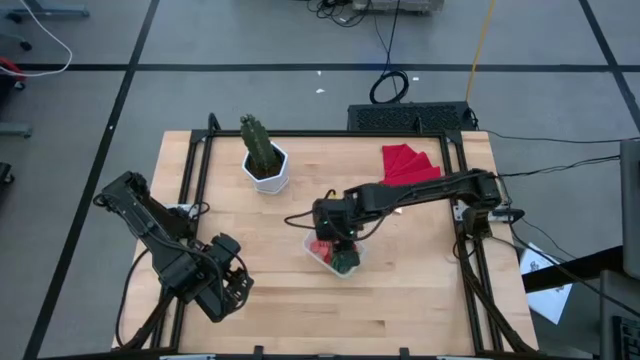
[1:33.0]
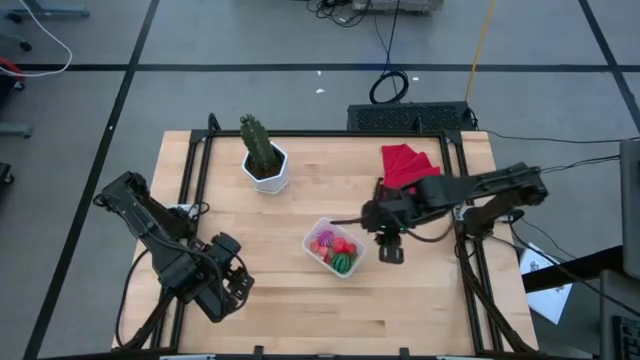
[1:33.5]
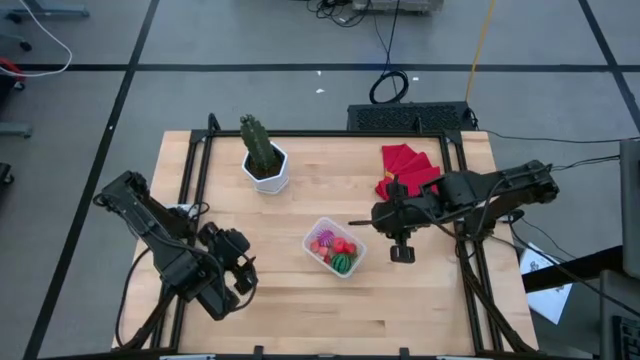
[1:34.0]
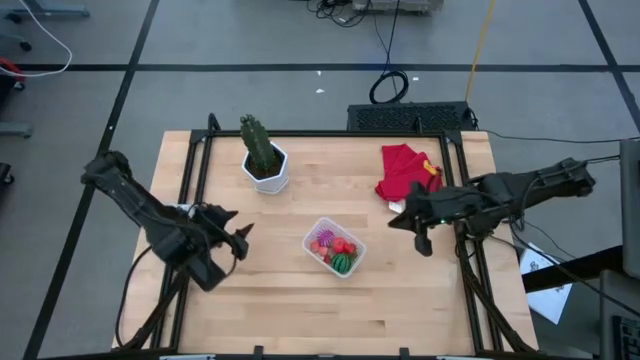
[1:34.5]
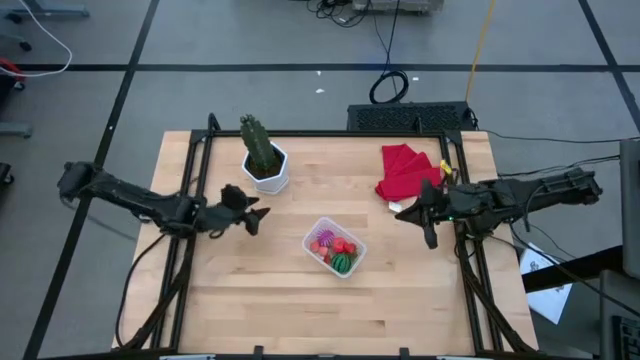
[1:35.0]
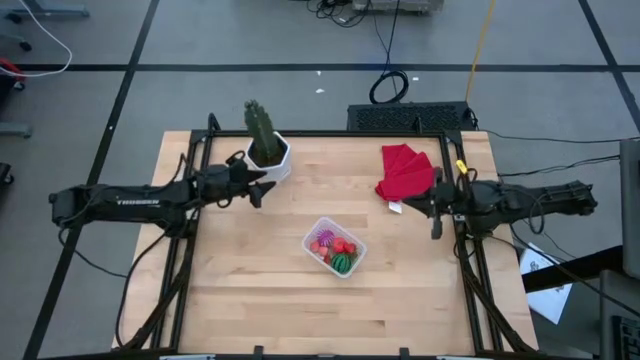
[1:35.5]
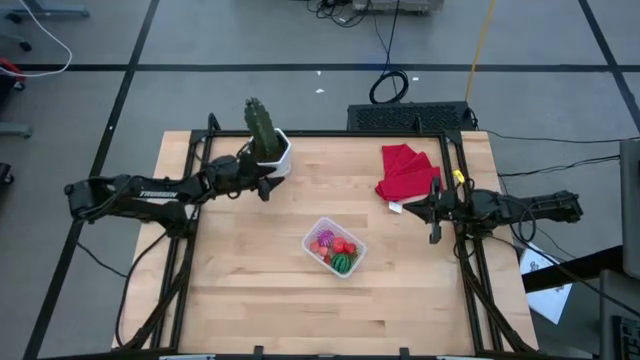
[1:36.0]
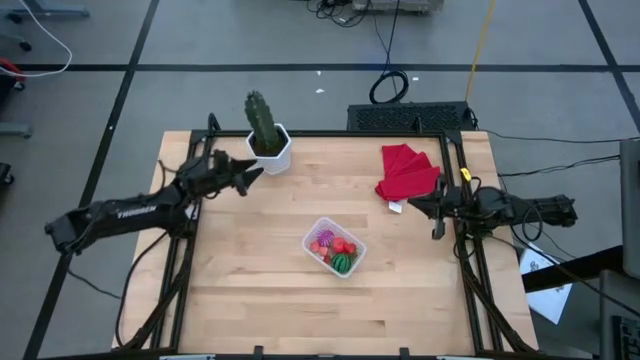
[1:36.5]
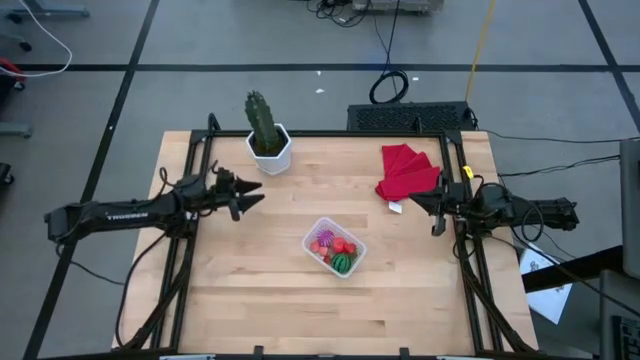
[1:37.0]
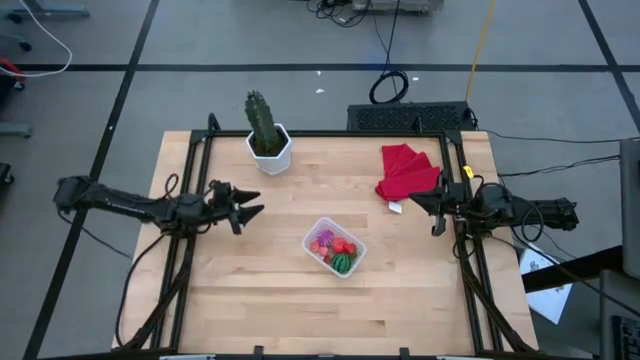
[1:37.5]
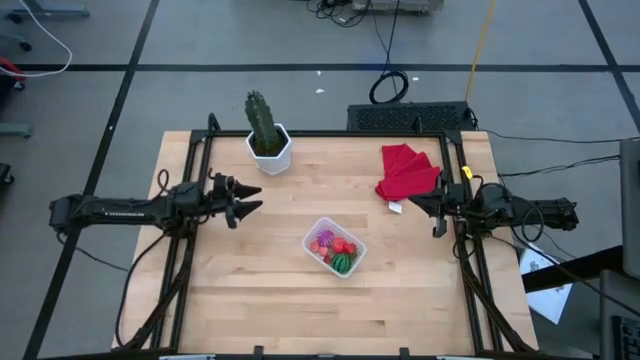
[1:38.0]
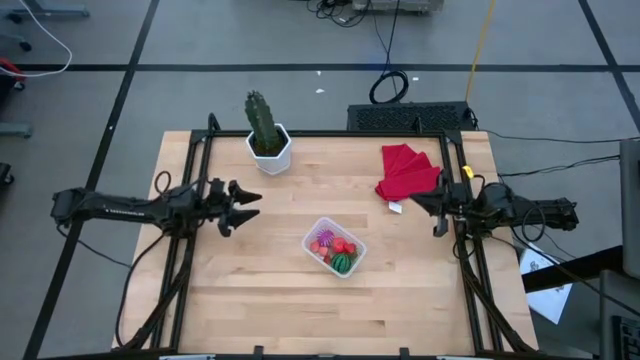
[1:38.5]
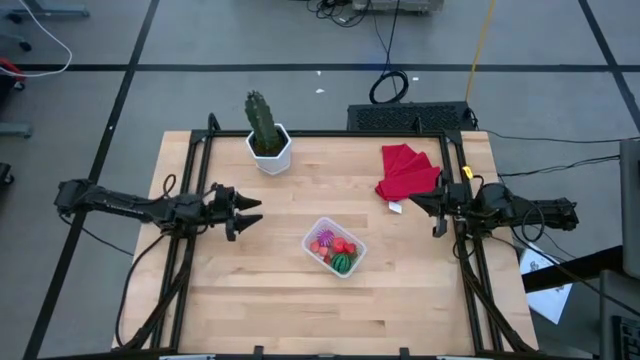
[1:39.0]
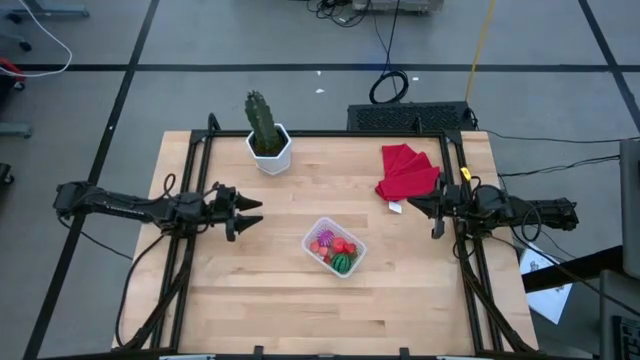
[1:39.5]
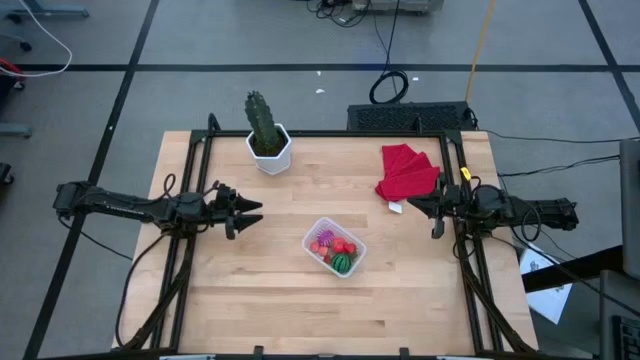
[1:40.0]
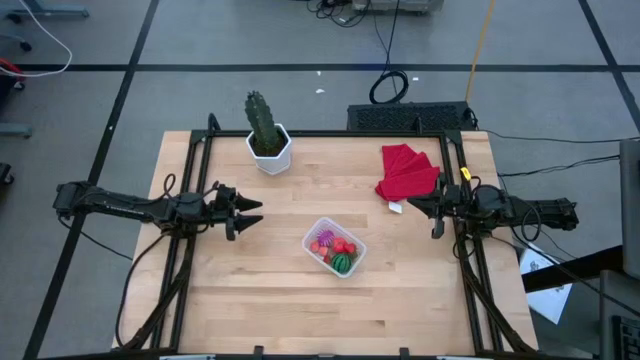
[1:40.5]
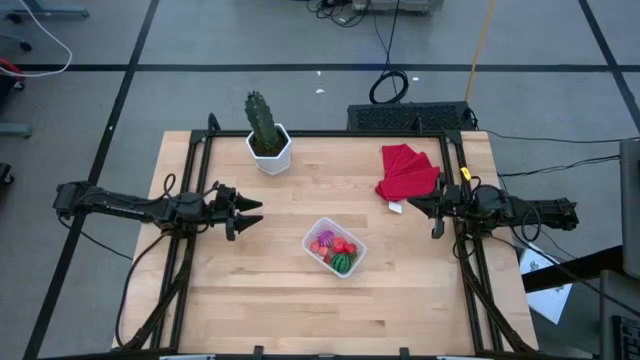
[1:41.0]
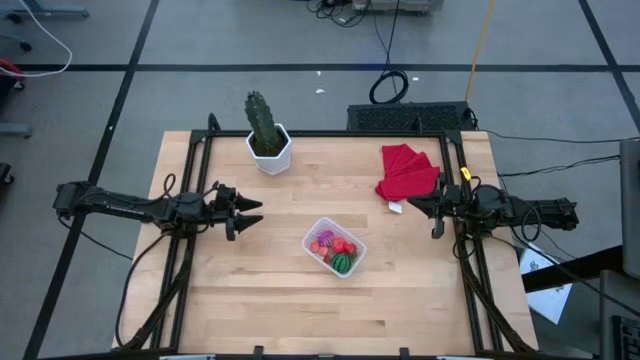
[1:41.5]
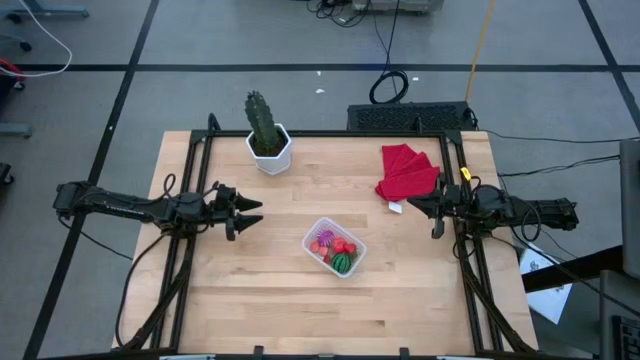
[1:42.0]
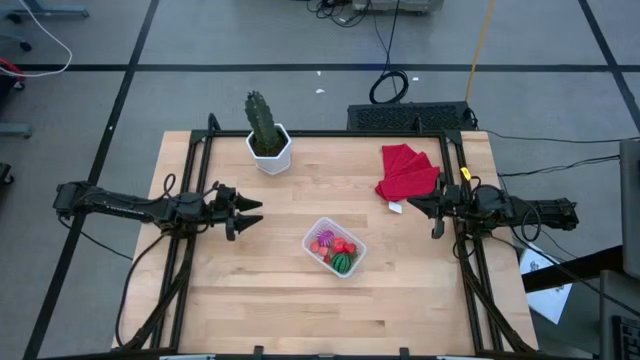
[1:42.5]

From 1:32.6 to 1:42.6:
Task: Pick and placing Produce into tupperware
Return to Home Position

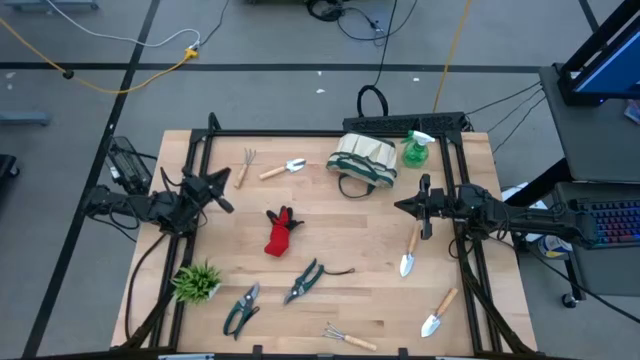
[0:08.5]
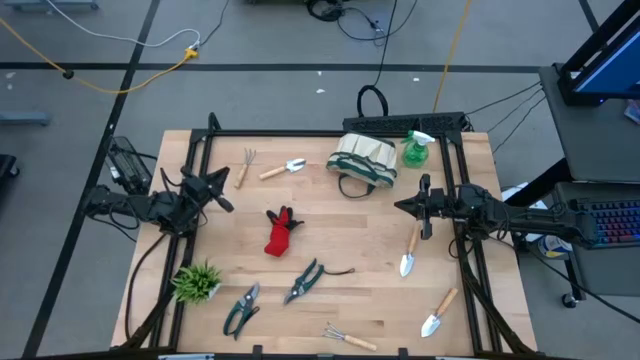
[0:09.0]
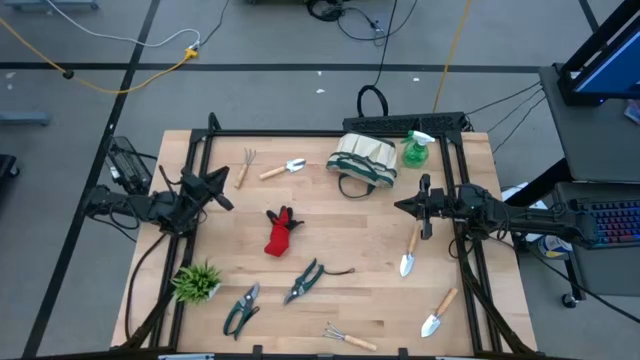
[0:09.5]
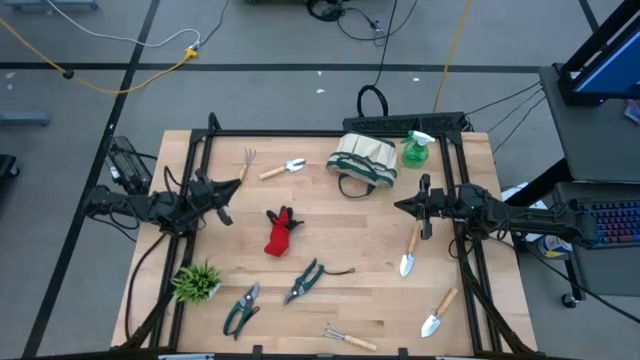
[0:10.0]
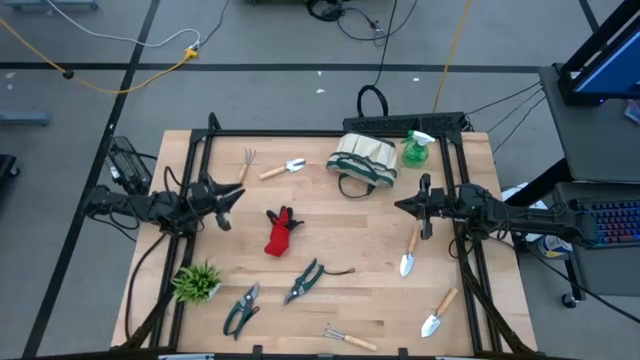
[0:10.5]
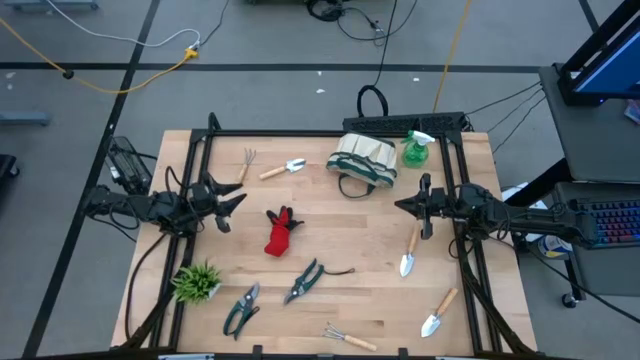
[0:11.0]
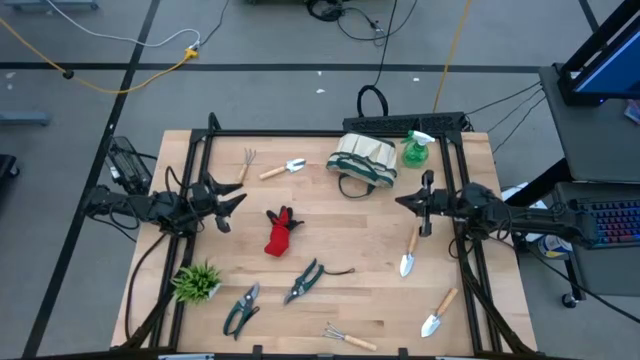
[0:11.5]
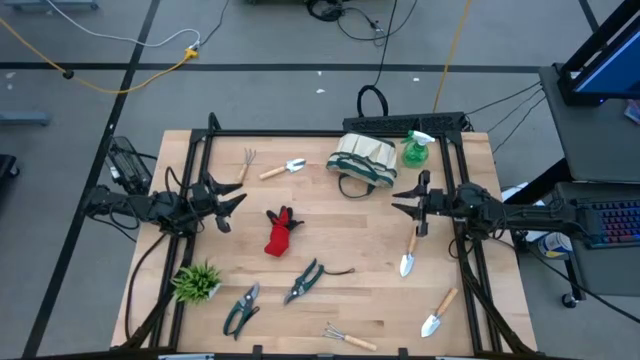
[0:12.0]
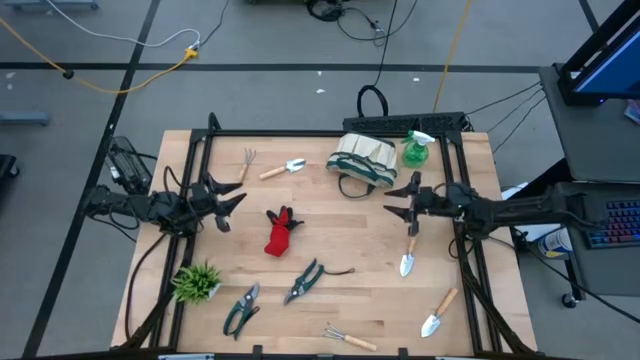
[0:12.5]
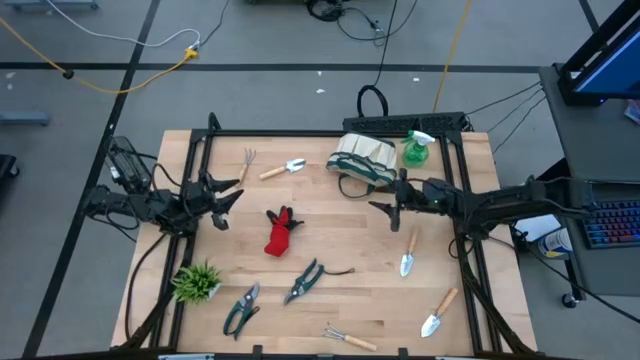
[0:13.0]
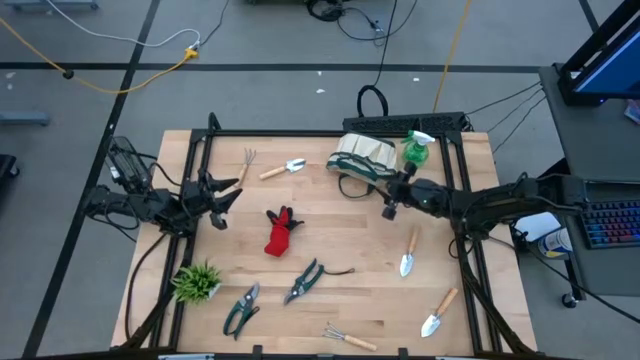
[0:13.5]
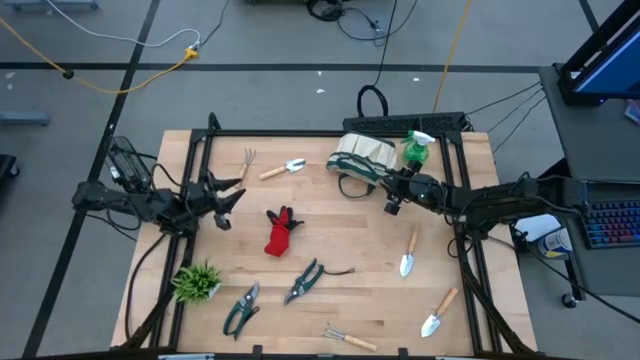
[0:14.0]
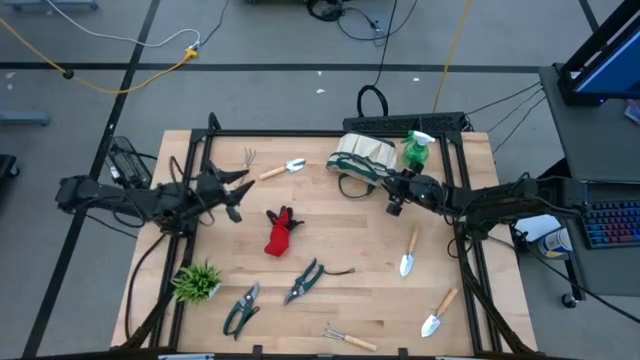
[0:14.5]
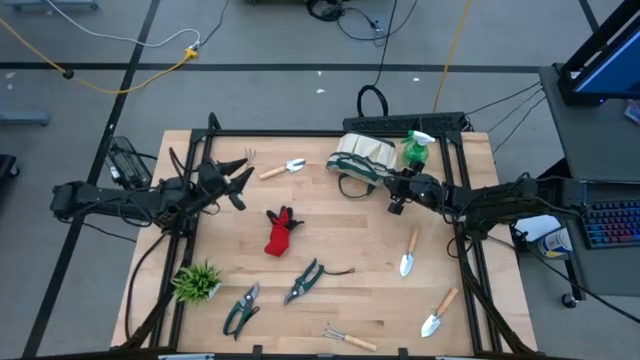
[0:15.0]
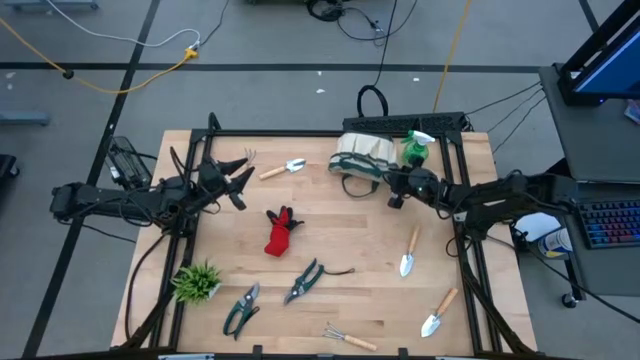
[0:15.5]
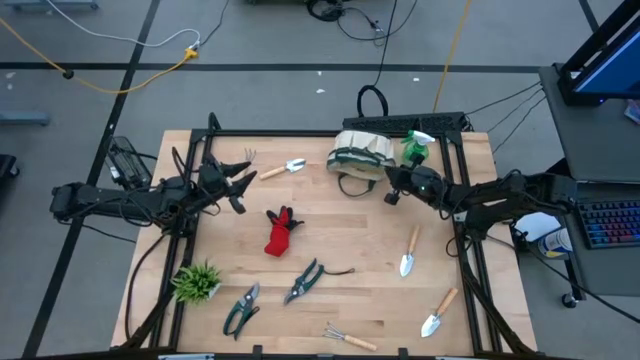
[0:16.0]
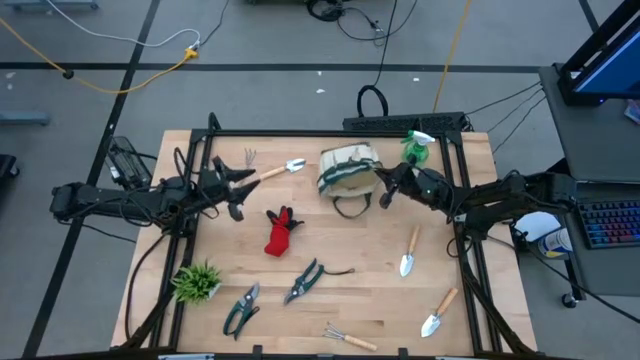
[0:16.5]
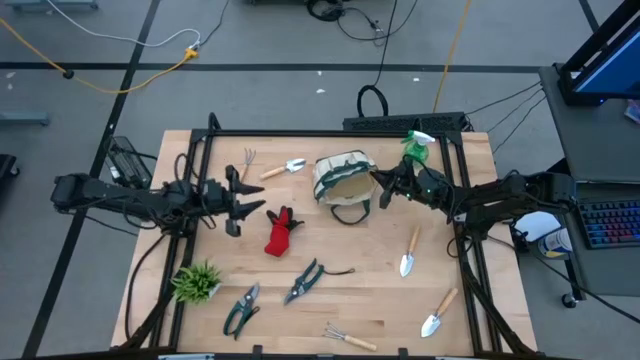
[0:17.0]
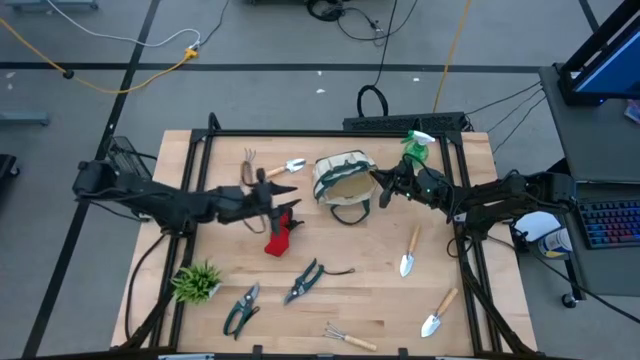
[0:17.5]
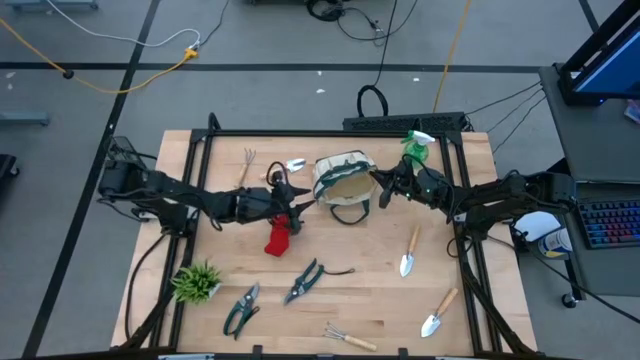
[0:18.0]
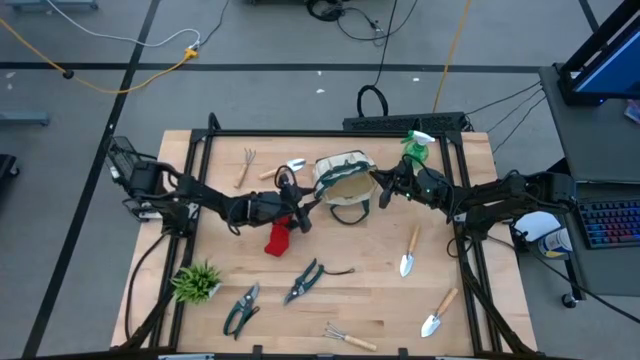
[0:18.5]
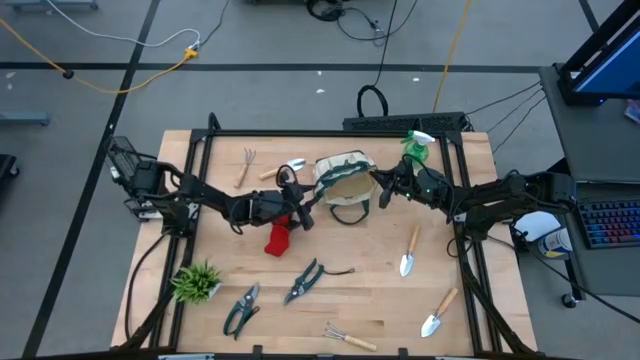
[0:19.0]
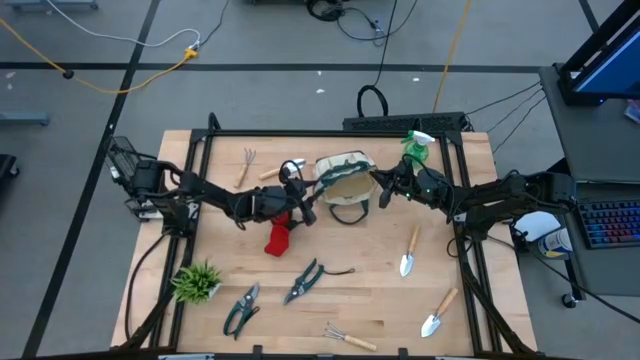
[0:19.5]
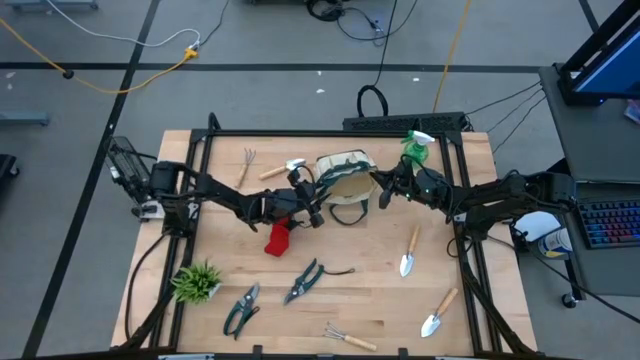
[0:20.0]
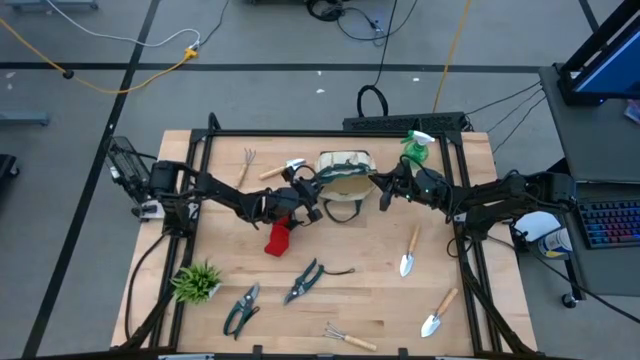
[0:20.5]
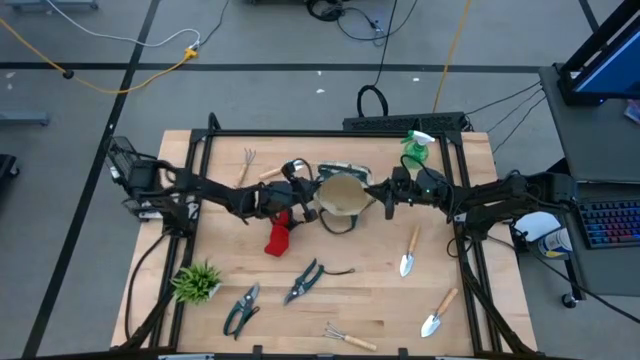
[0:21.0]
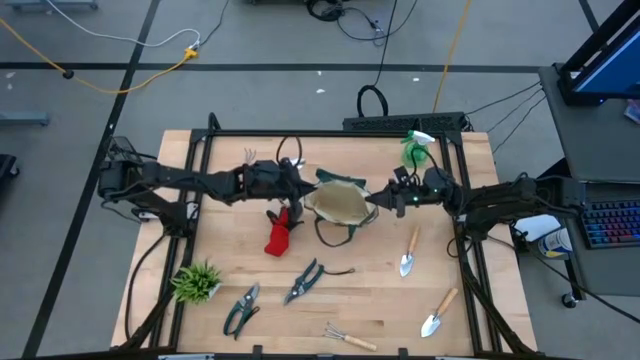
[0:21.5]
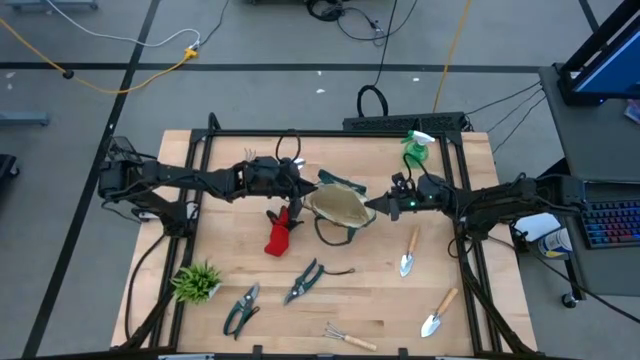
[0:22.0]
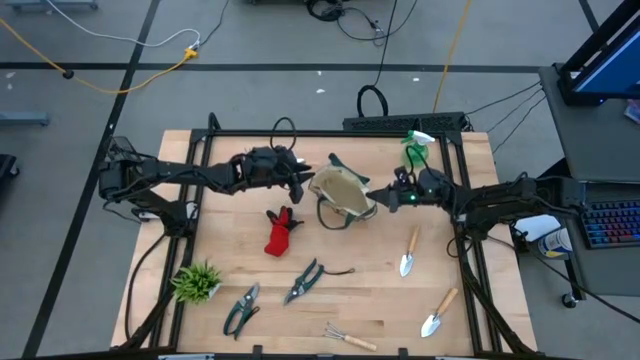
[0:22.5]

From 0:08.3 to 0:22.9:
Task: Pick & Place Garden tools in Gardening bag
Prepare the gardening bag
